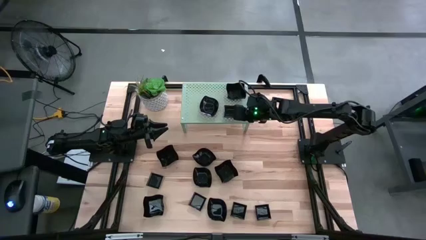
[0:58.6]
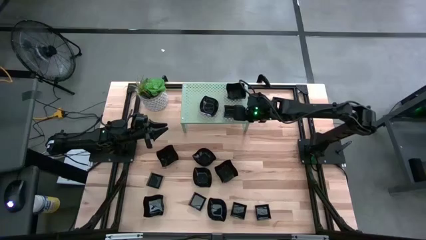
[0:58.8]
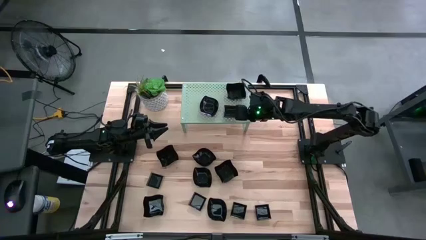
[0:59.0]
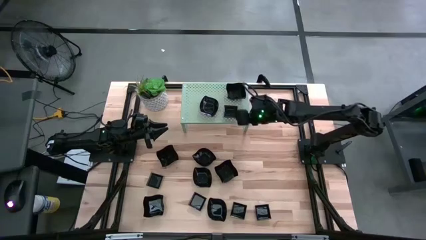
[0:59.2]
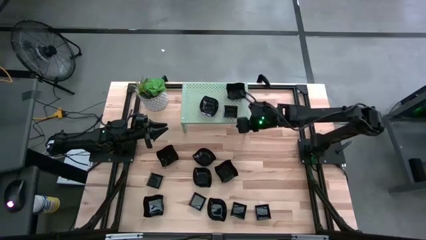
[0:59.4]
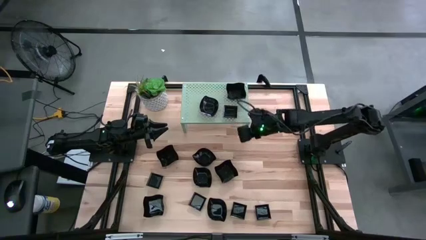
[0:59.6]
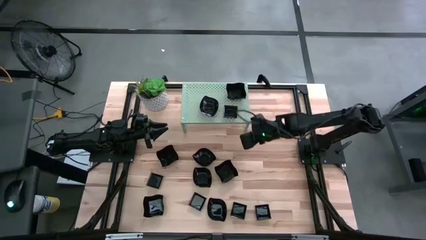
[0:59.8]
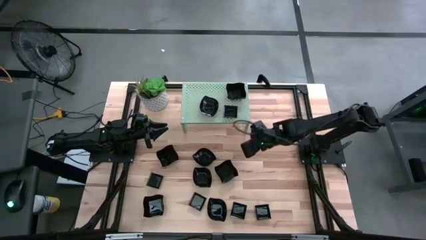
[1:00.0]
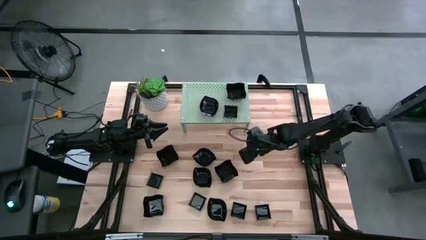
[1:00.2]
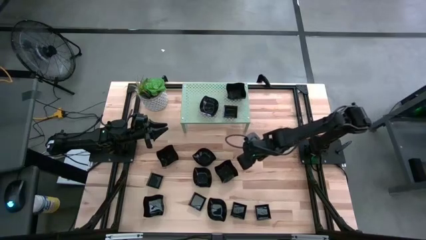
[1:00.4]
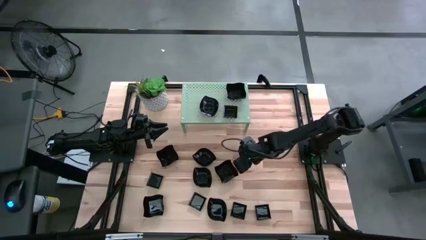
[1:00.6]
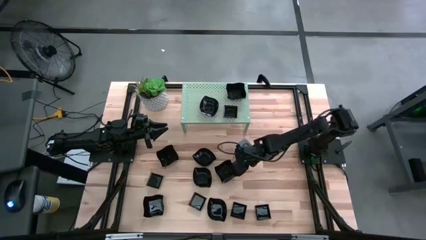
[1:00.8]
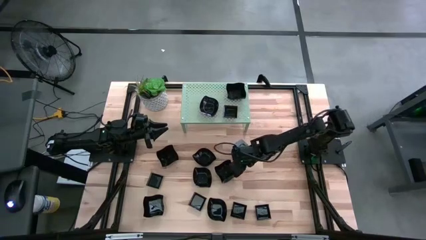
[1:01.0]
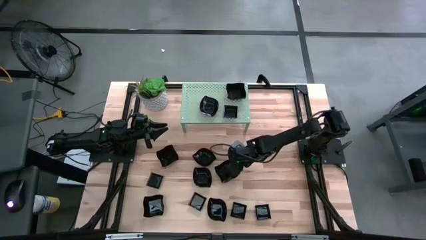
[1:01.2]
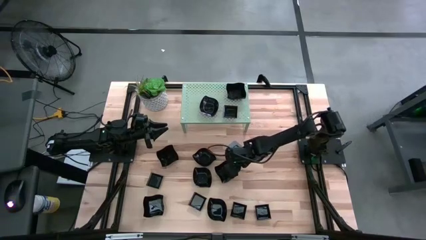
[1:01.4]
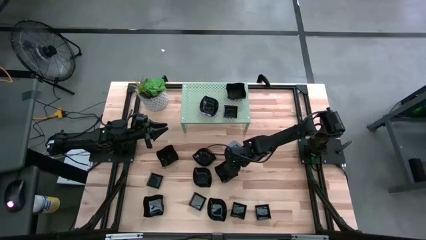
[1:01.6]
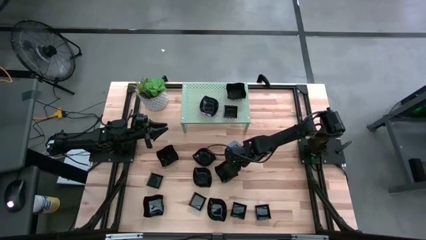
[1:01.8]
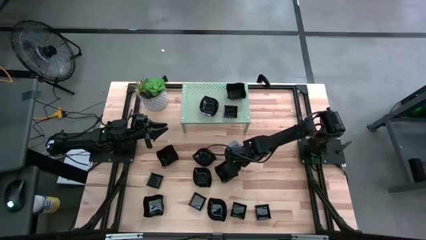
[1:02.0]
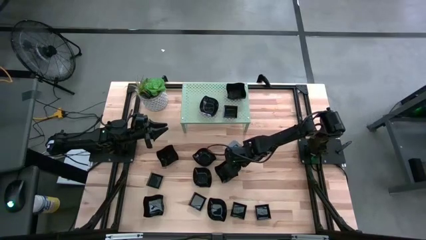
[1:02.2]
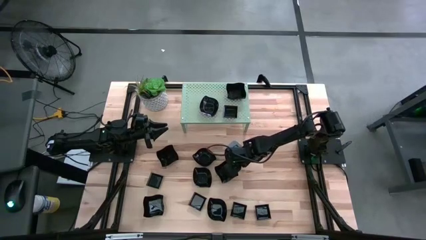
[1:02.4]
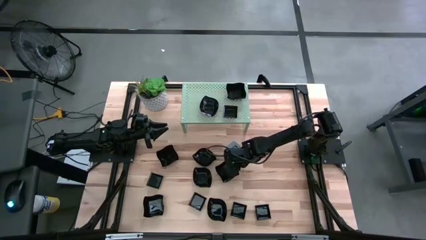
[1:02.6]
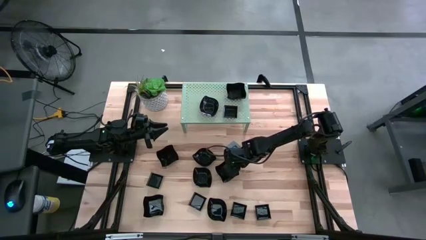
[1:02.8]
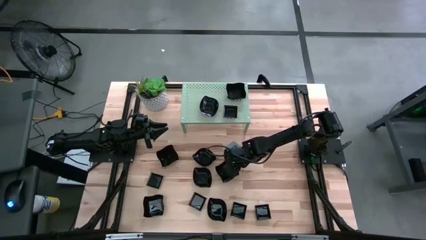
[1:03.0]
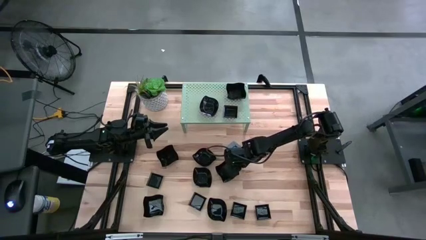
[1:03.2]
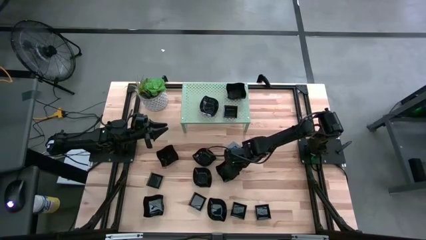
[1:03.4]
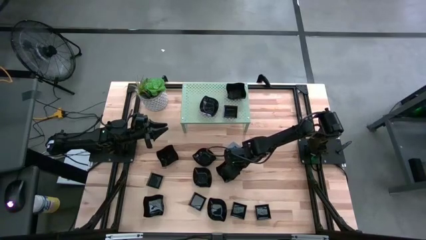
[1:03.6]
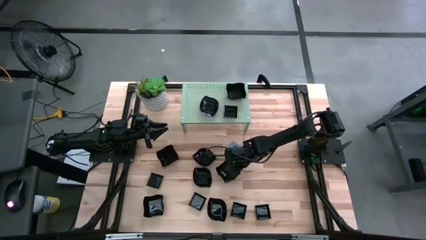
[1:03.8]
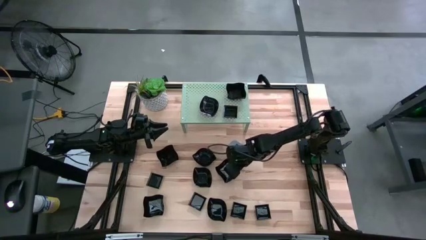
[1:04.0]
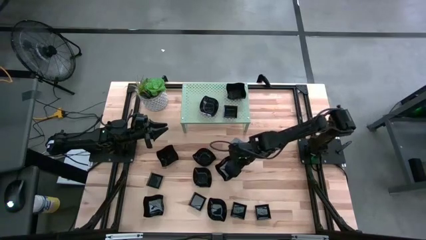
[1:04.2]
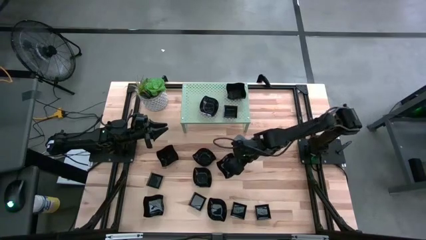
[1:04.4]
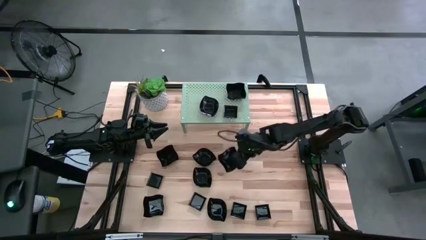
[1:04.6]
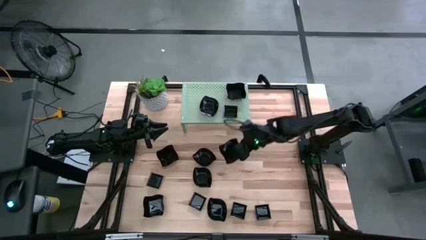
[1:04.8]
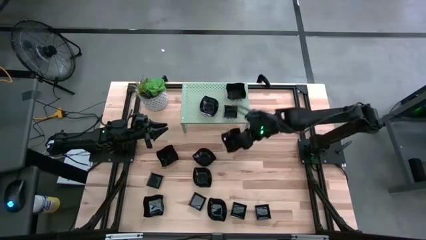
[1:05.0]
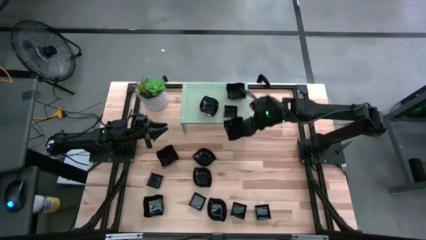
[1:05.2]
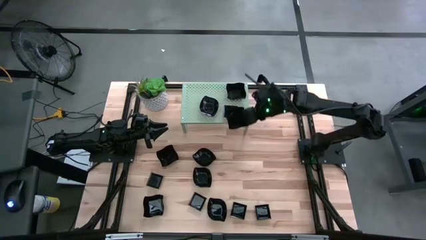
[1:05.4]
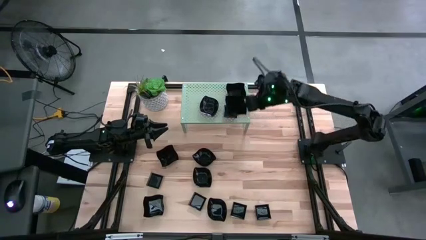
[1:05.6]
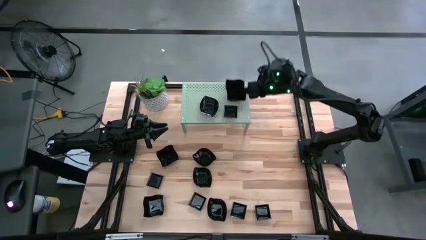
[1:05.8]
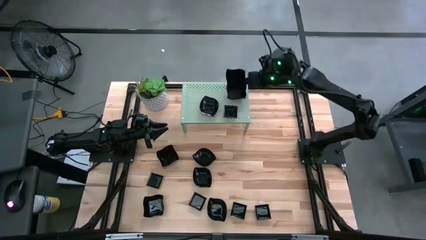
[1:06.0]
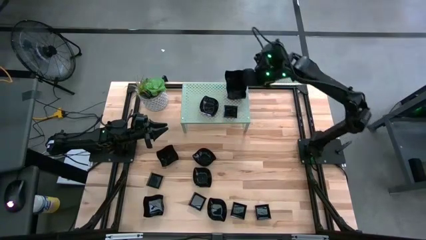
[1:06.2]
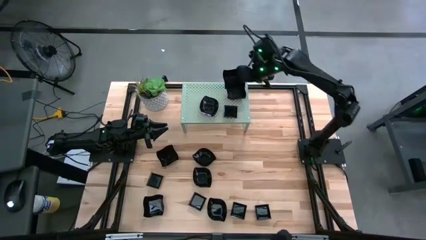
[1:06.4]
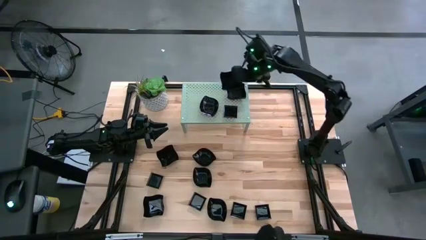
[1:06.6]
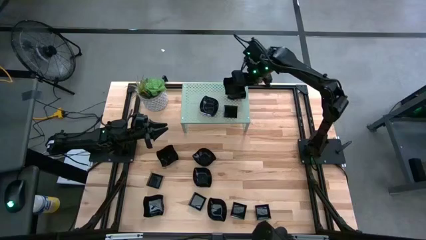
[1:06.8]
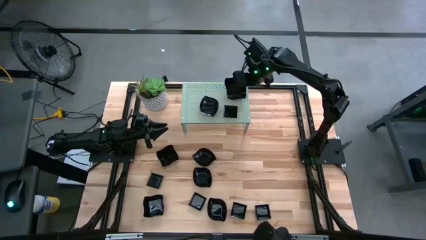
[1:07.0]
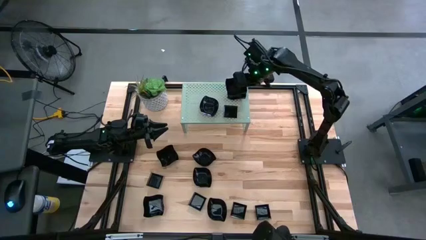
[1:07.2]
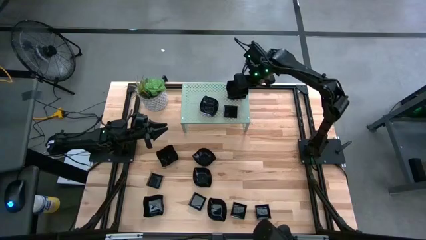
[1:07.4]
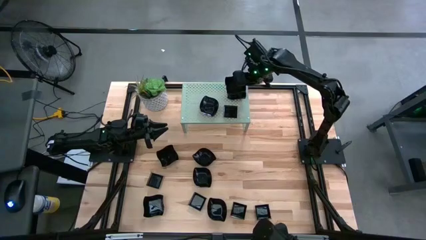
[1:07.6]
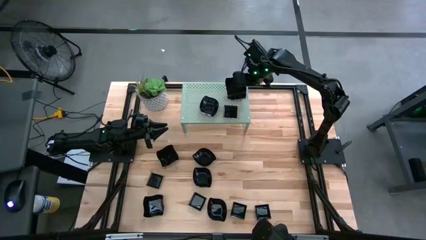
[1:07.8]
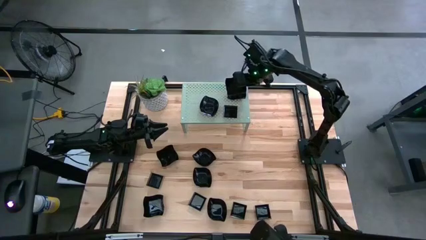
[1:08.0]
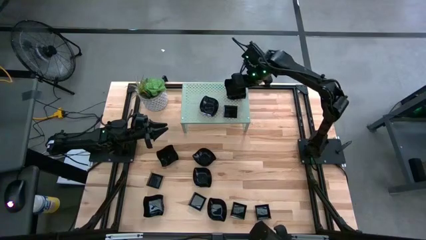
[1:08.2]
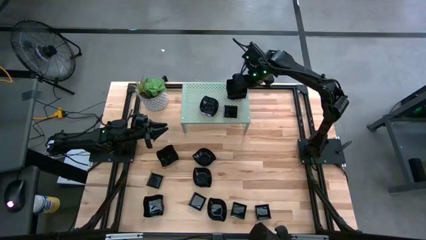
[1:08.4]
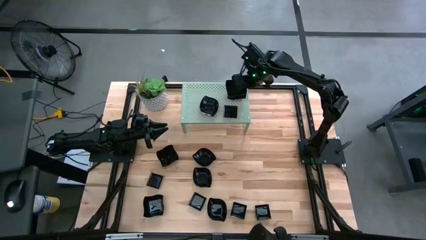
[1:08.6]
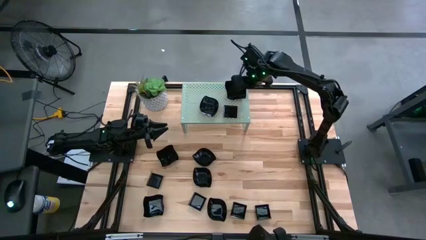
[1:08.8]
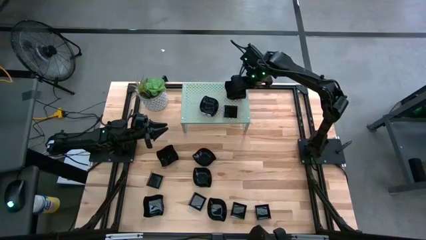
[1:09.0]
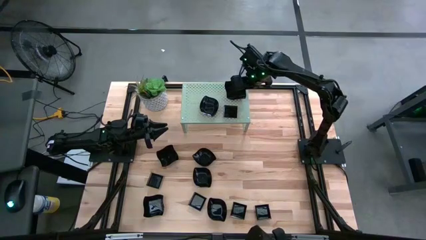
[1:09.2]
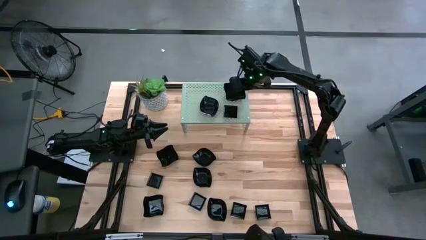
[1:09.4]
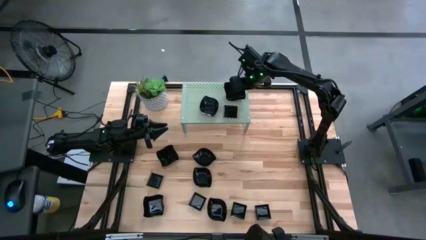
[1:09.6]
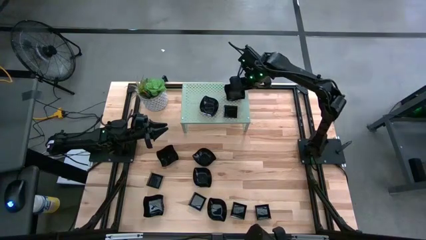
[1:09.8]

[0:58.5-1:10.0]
Task: Pick & Place Mini shaped plates
Stack the distorted square plate on top of the distorted square plate on the shelf

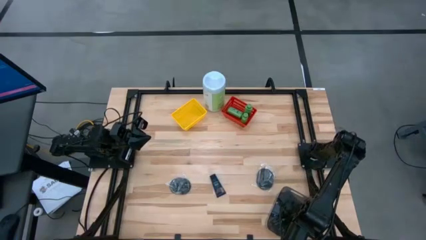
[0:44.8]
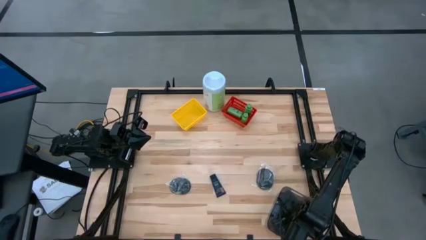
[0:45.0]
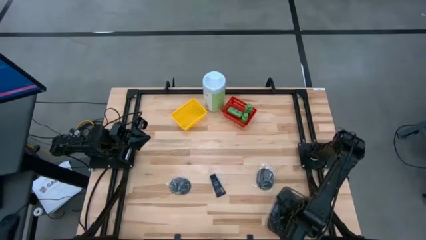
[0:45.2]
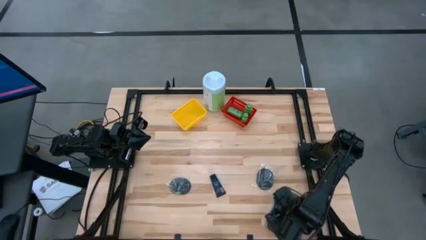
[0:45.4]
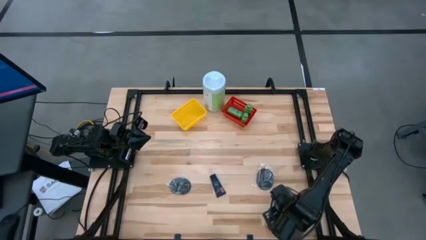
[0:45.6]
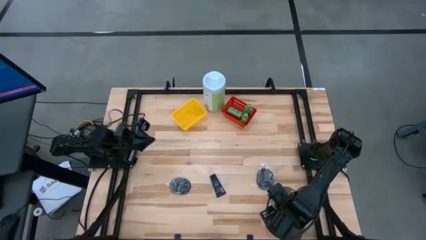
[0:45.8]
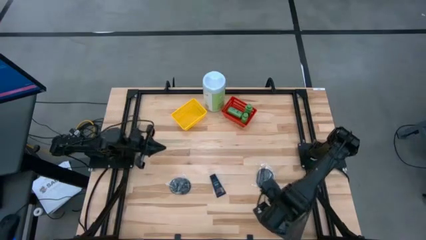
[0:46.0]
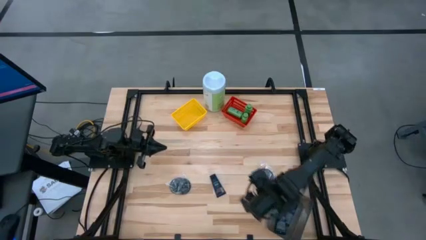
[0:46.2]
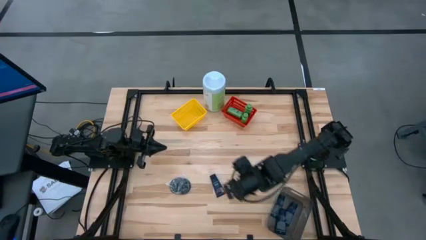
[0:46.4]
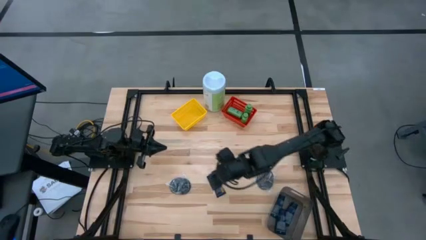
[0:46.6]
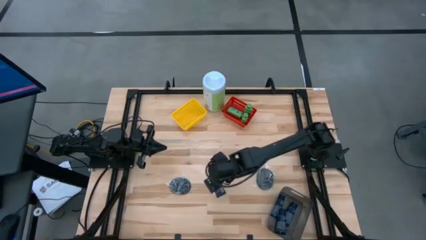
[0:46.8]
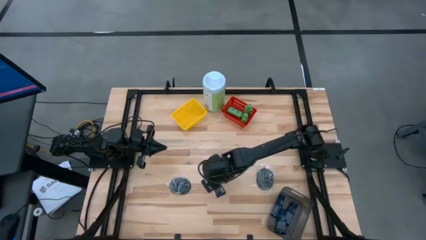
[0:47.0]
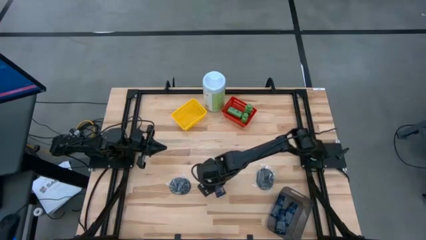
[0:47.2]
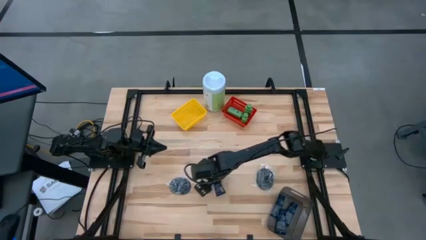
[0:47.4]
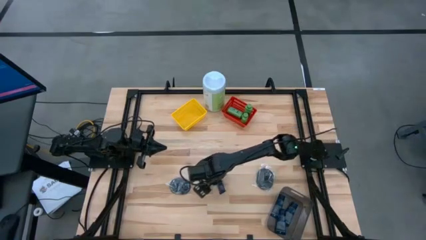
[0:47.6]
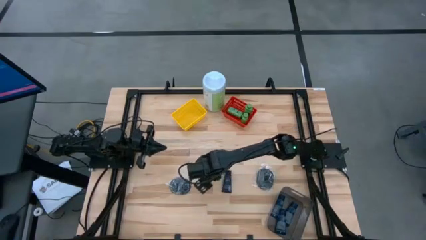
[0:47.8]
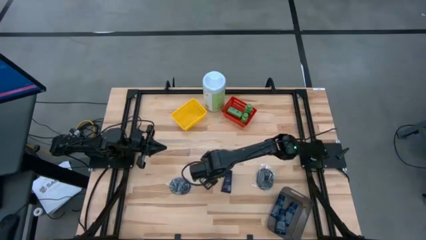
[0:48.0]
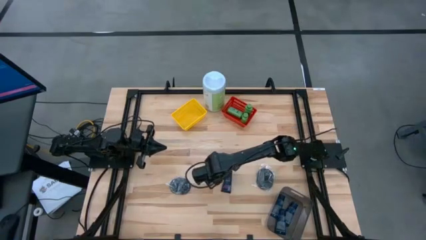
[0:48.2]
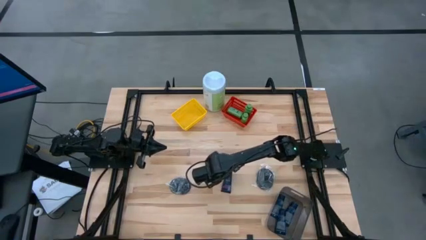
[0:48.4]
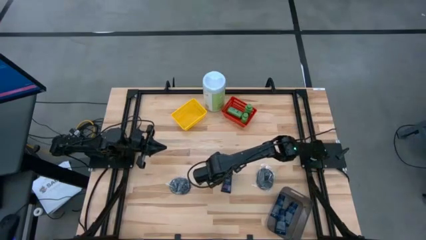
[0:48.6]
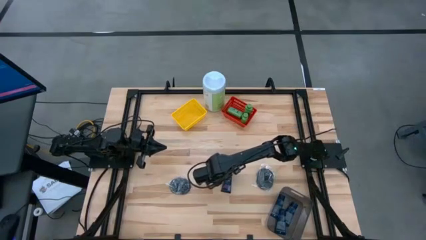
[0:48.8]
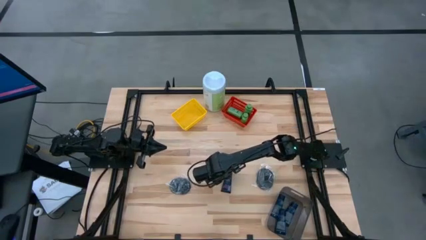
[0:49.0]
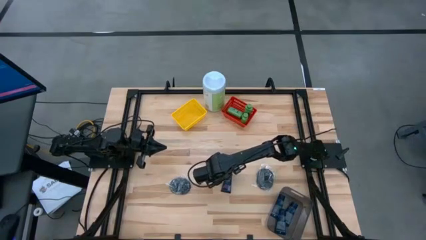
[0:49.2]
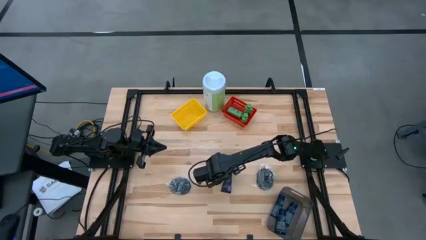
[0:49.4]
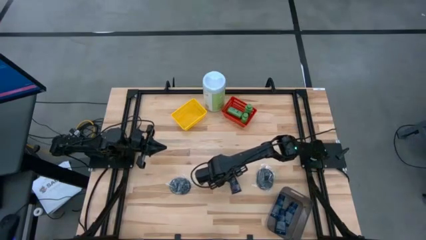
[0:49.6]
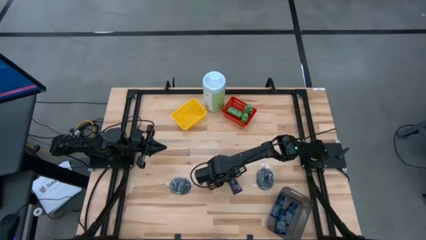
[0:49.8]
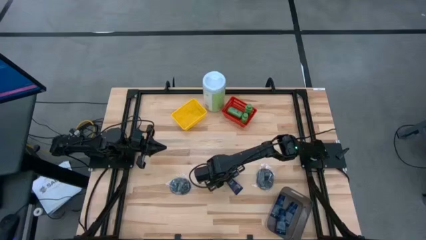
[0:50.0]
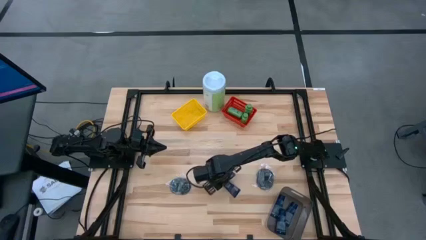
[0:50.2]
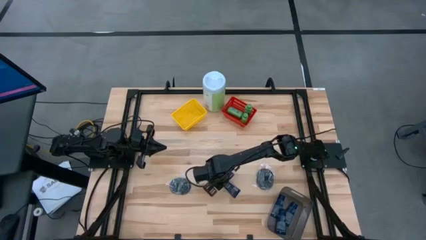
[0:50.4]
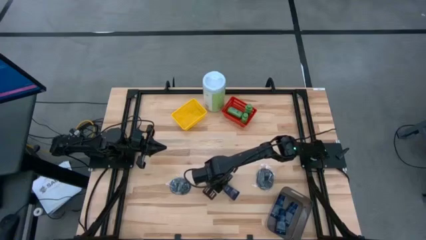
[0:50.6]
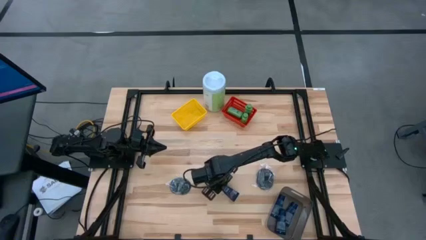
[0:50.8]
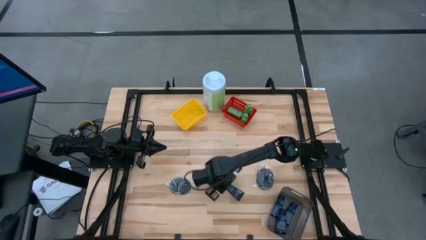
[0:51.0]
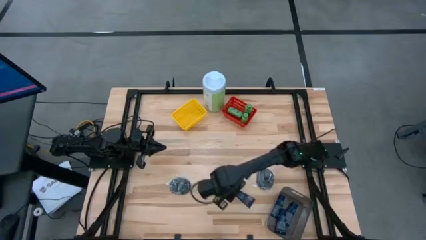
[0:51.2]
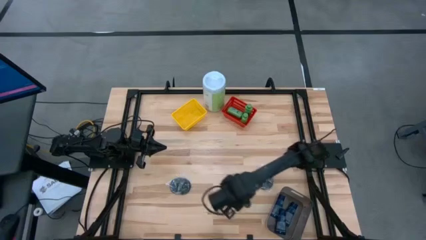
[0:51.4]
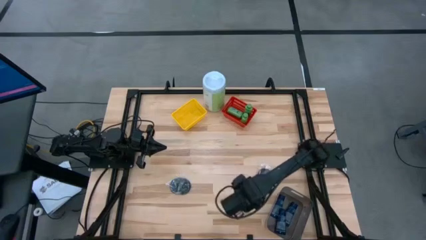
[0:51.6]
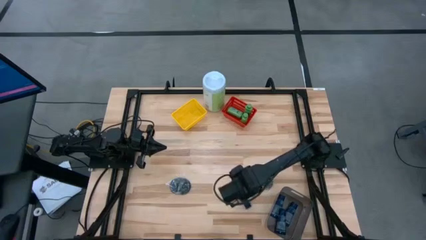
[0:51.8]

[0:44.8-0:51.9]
Task: Pick & Place Travel size toiletries
Put the dark blue shave cream in the black bin
